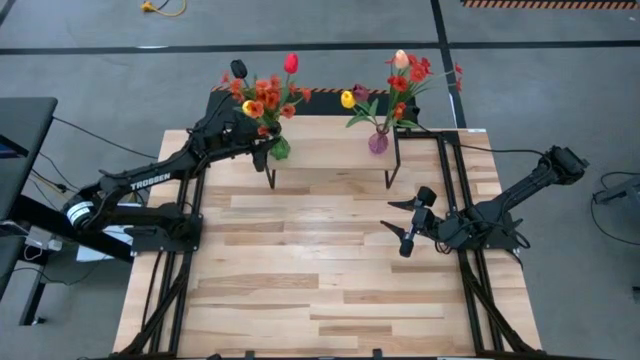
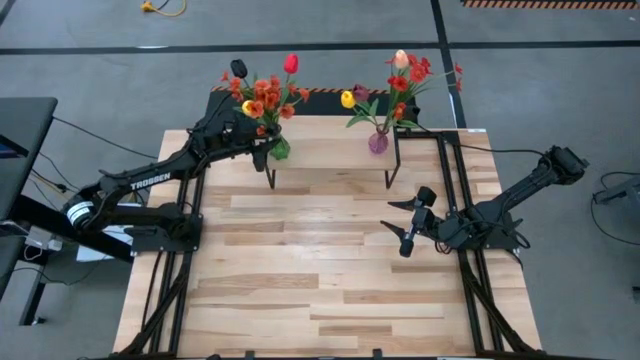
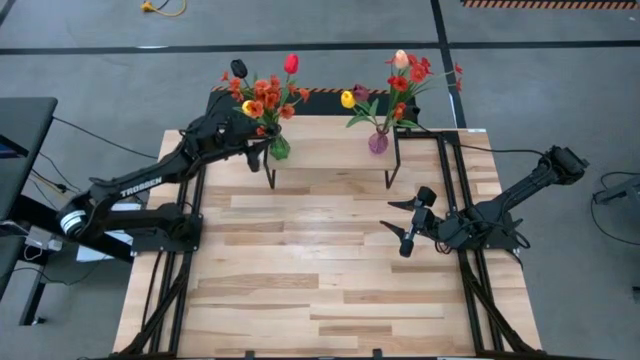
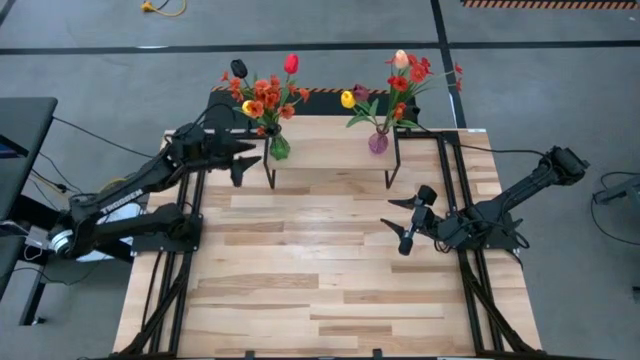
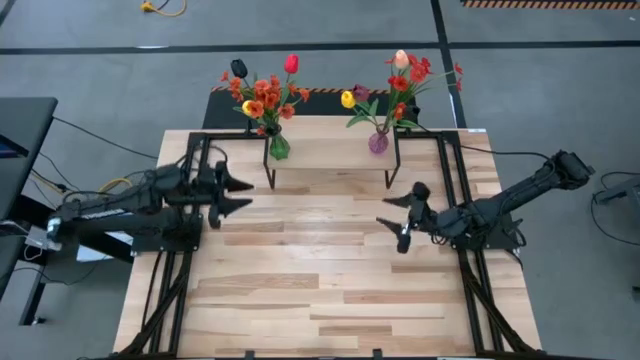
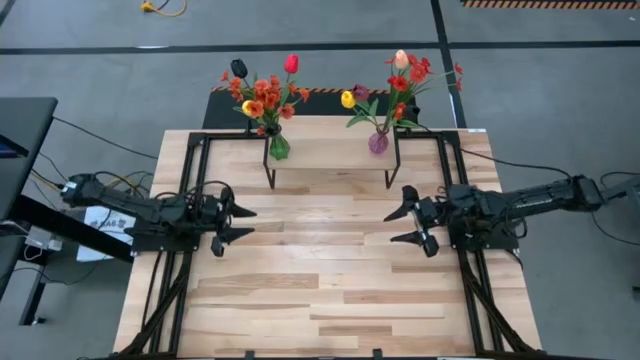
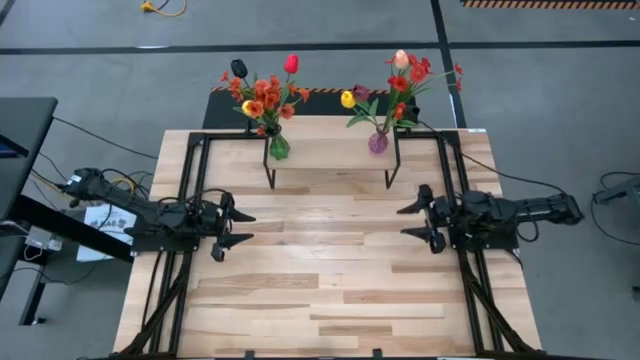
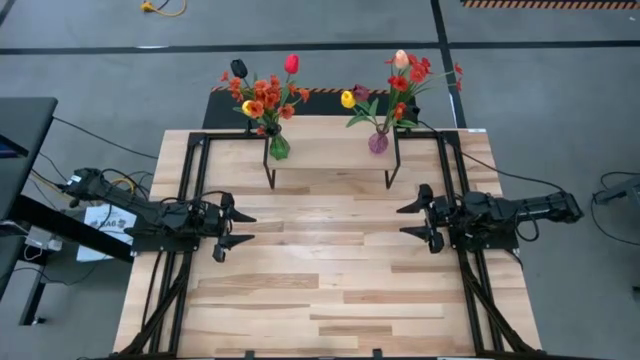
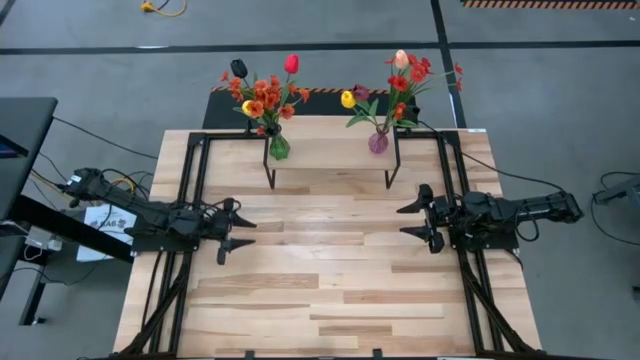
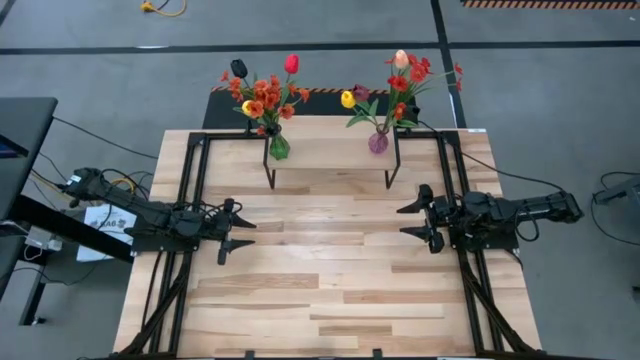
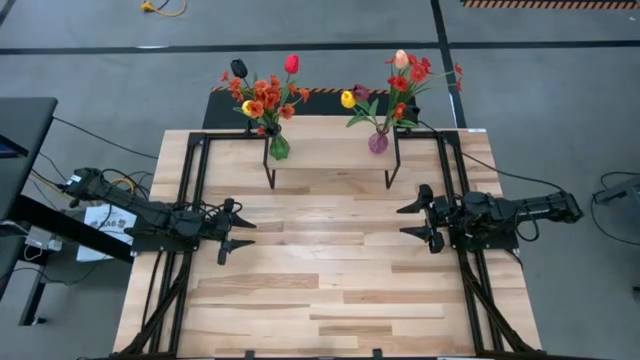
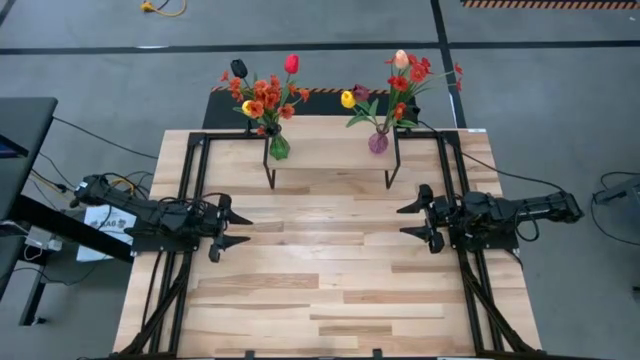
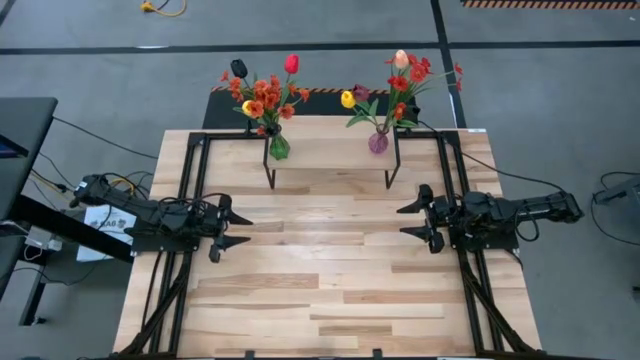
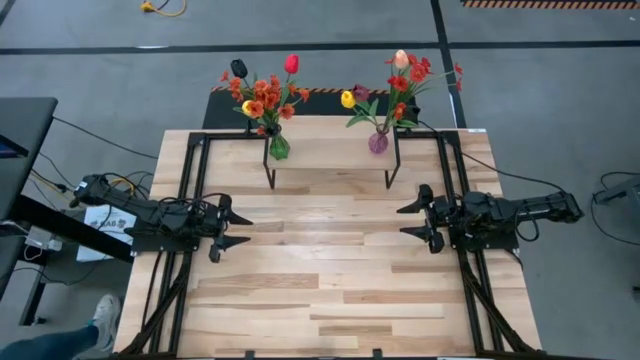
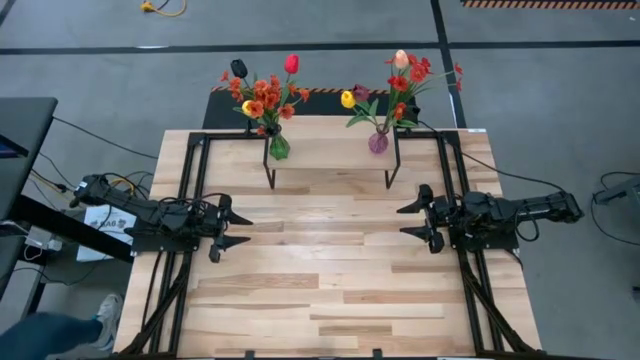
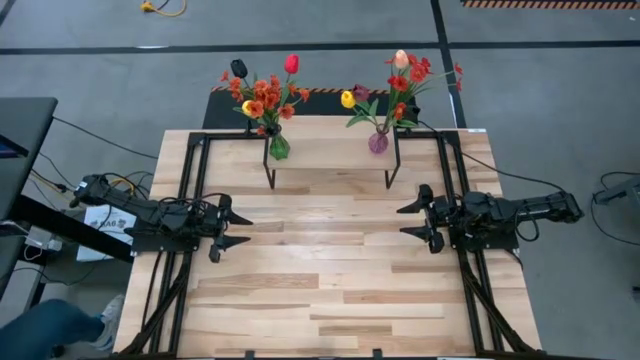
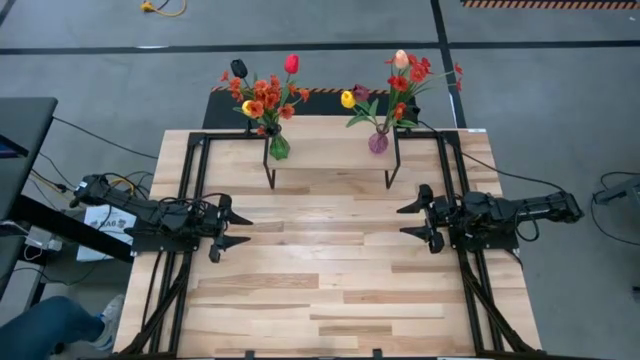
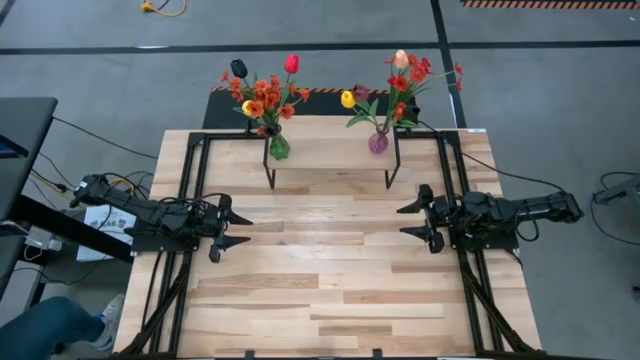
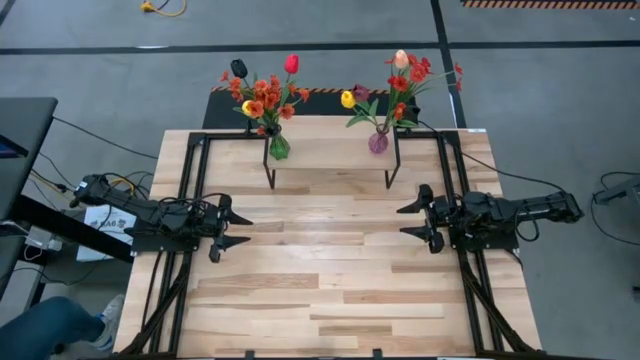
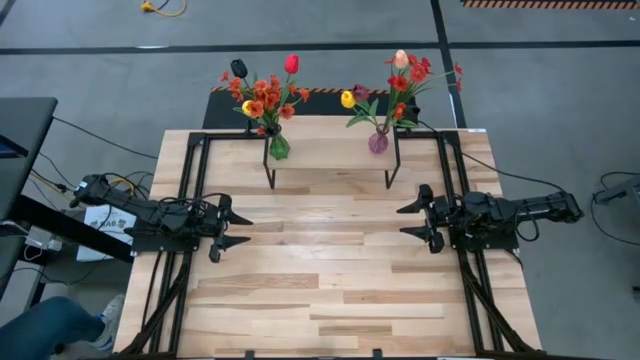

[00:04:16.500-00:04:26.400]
Task: Pick and place flowers into a vace then onto a shelf
Return to Home Position

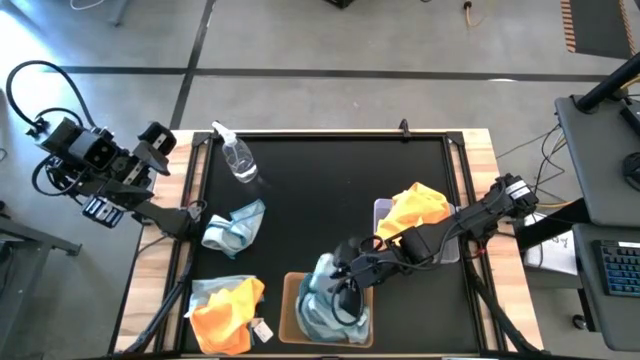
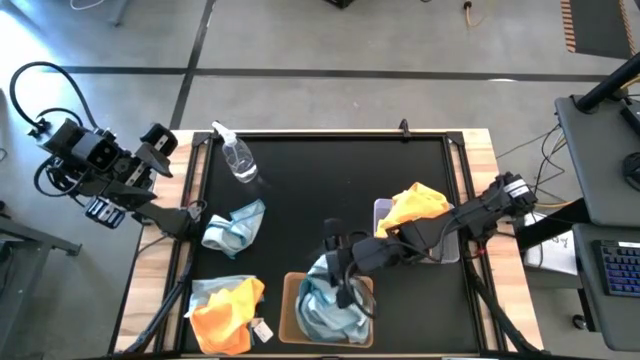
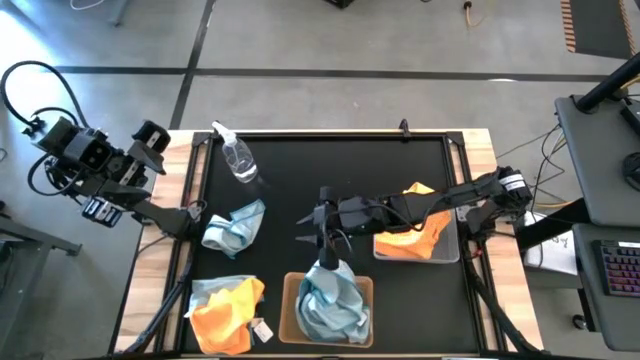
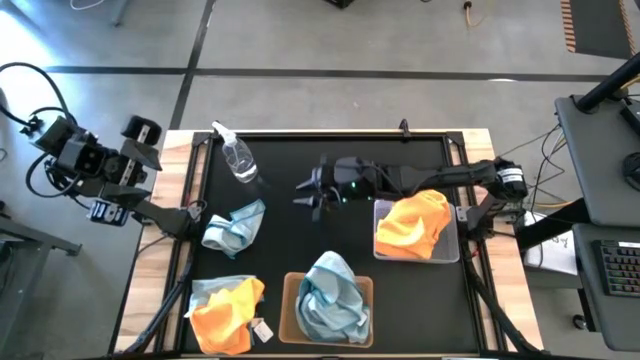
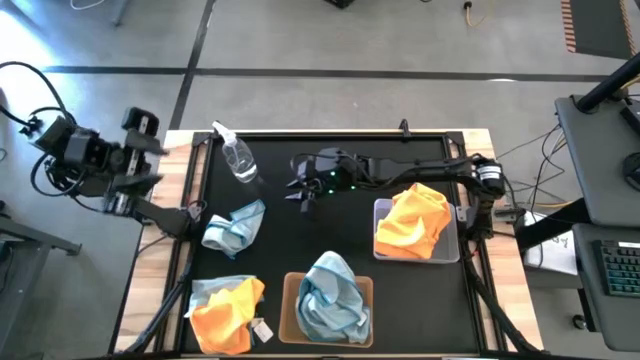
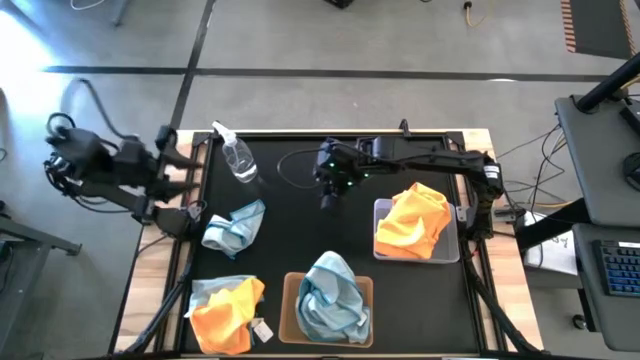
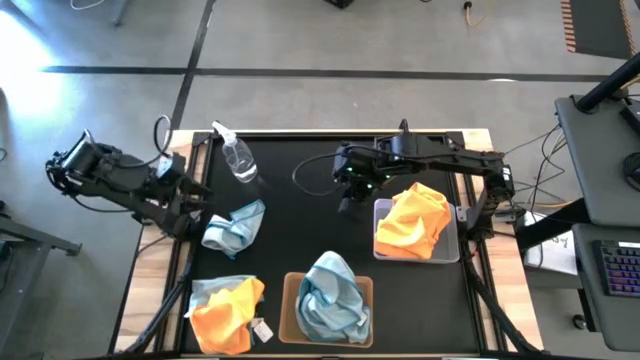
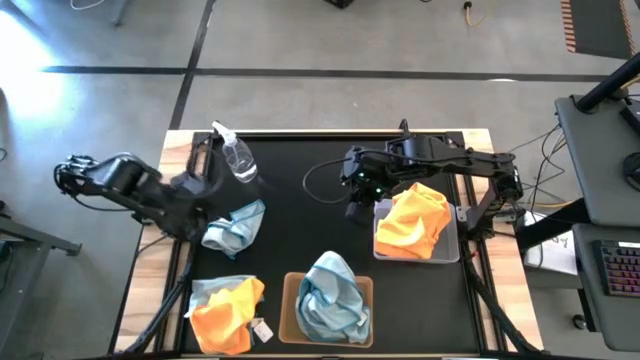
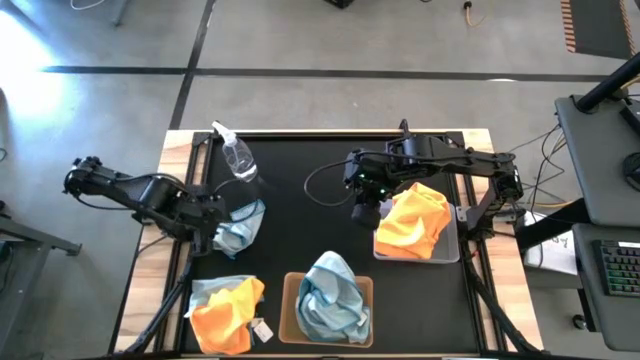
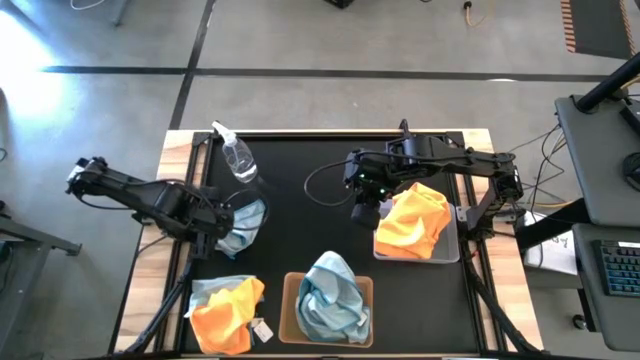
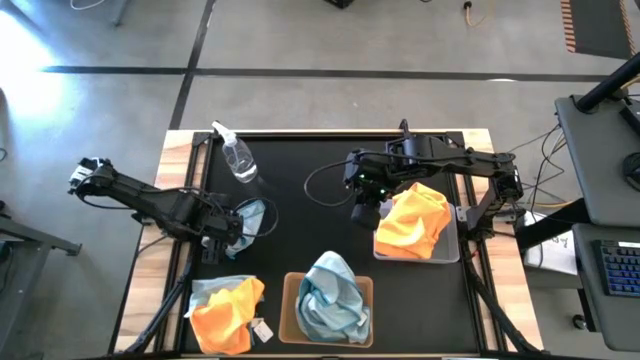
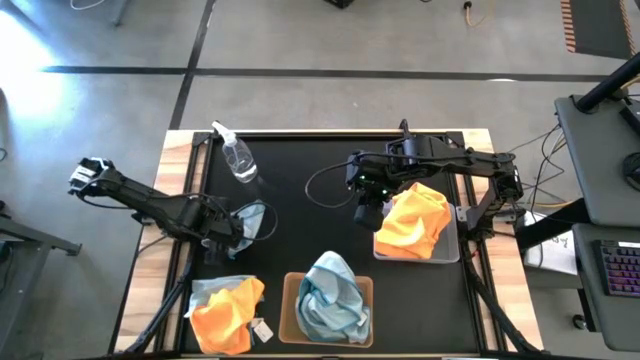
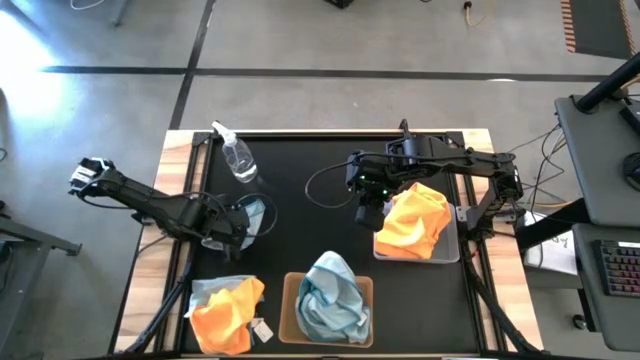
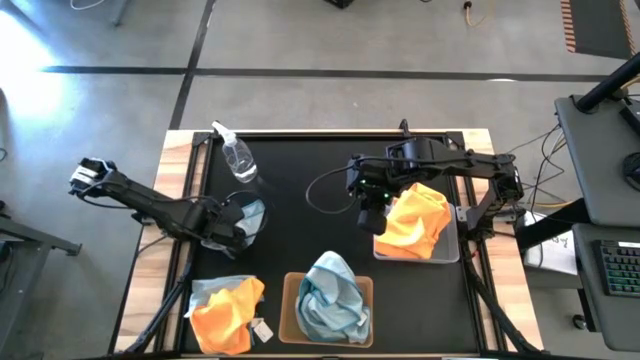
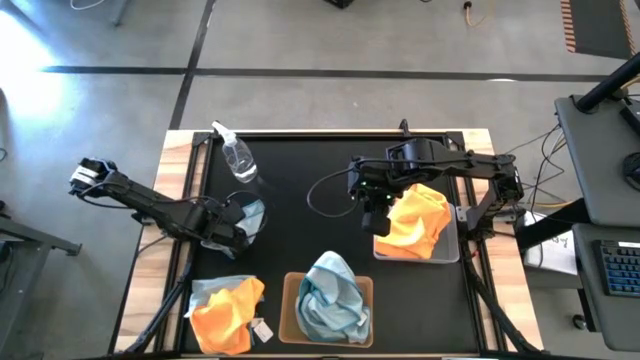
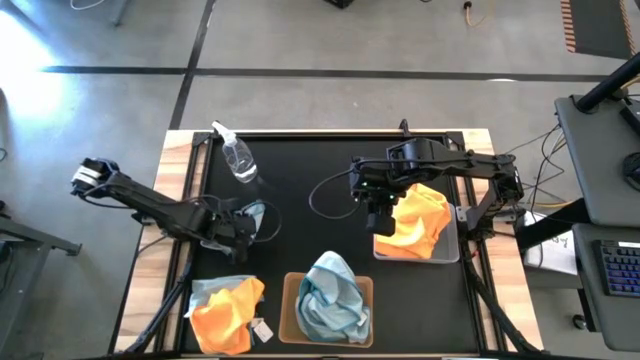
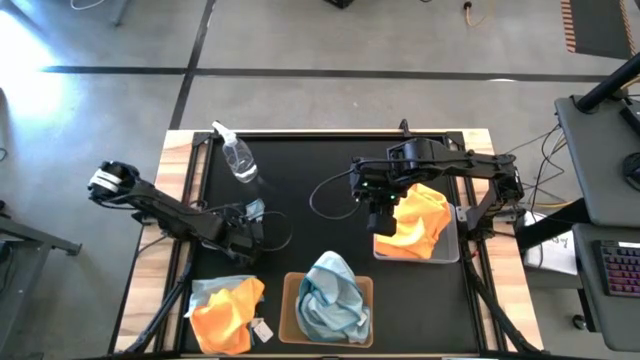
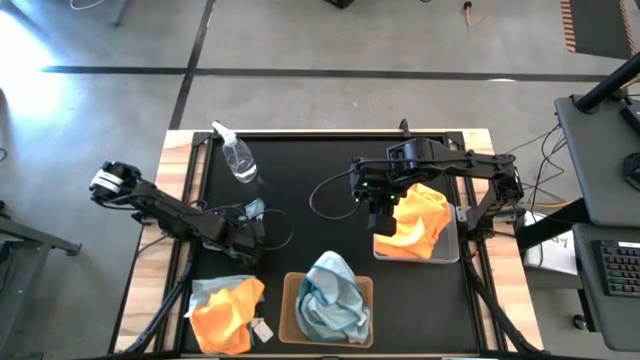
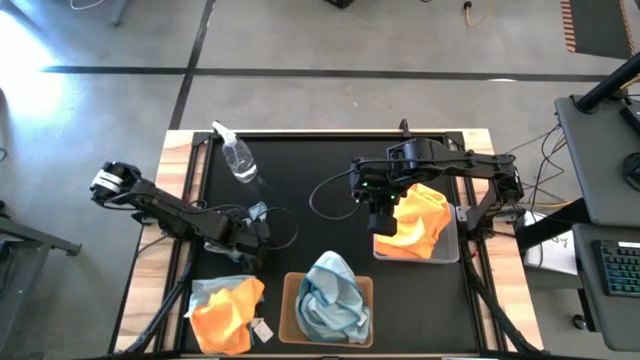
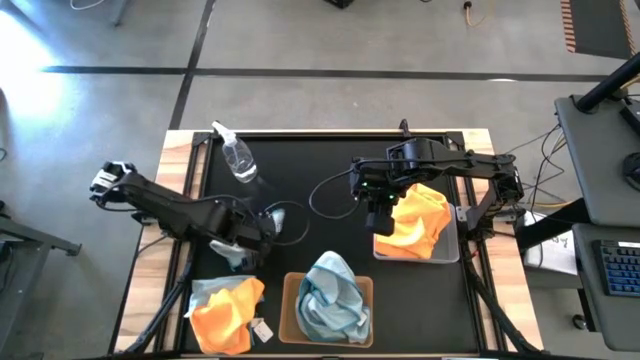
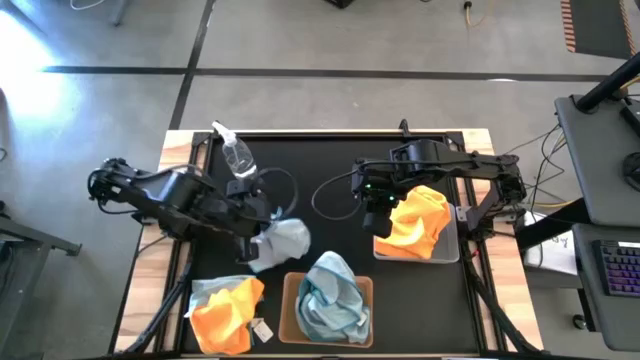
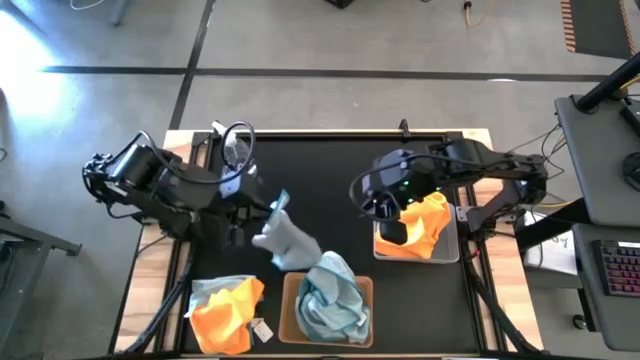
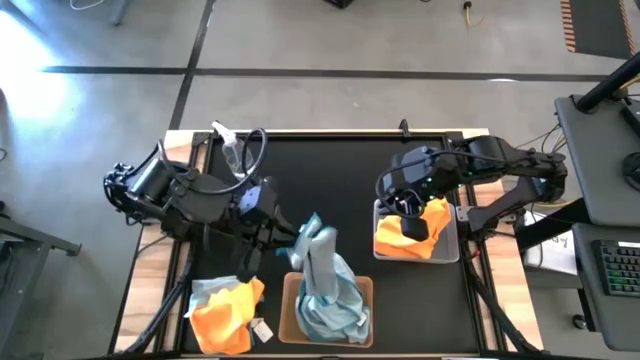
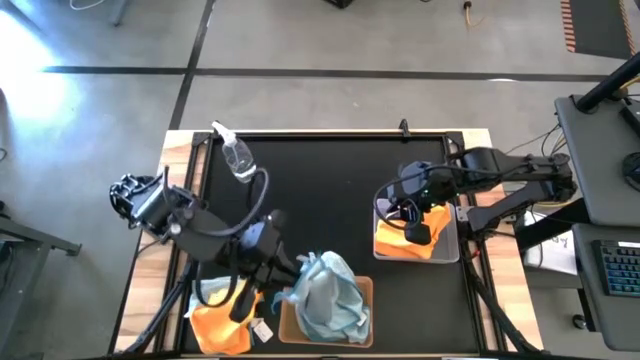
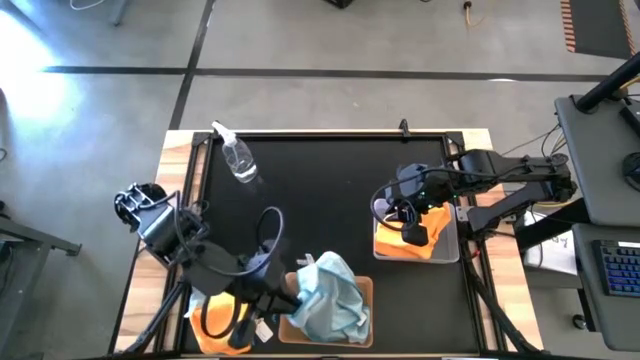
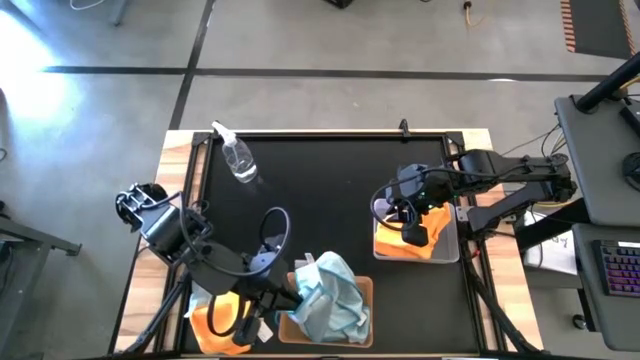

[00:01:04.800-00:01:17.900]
Task: Sort microfiber towel by color & place in baskets
Put the top blue microfiber towel into the orange bin
